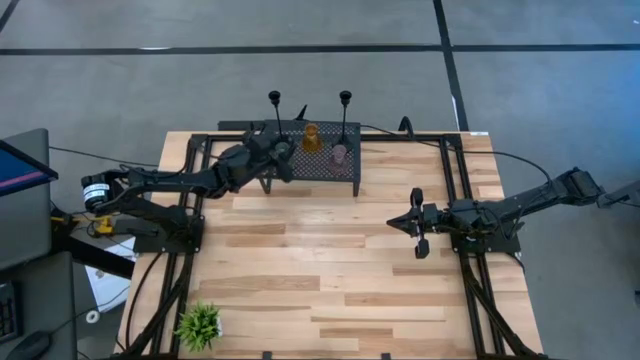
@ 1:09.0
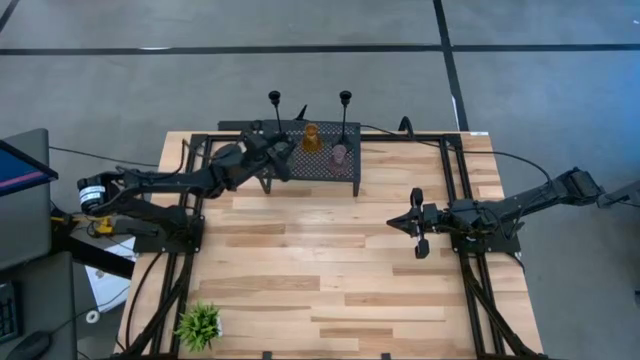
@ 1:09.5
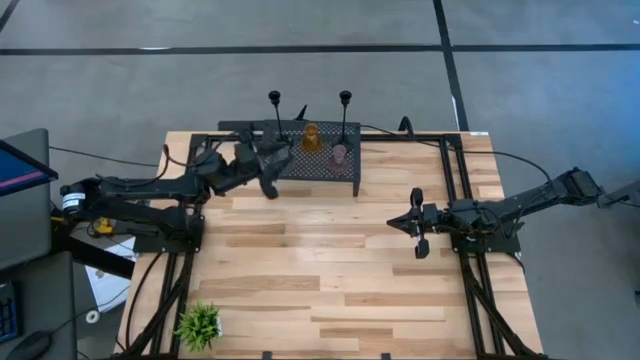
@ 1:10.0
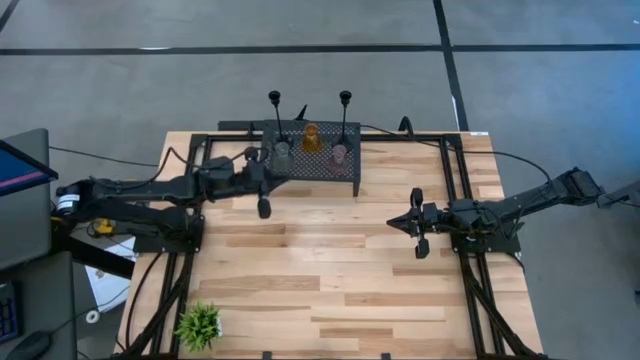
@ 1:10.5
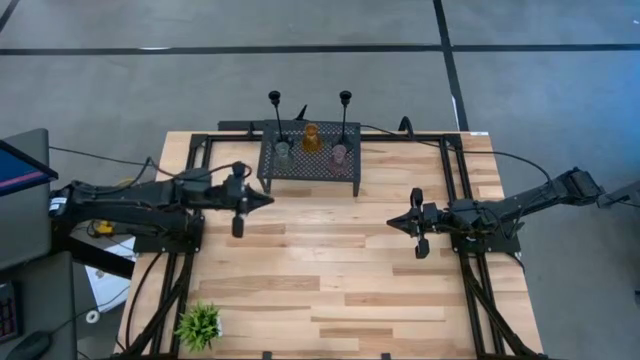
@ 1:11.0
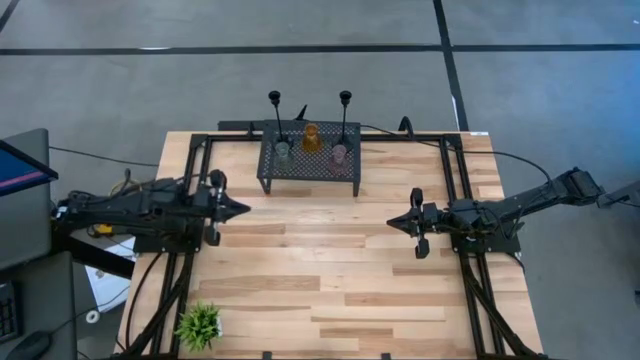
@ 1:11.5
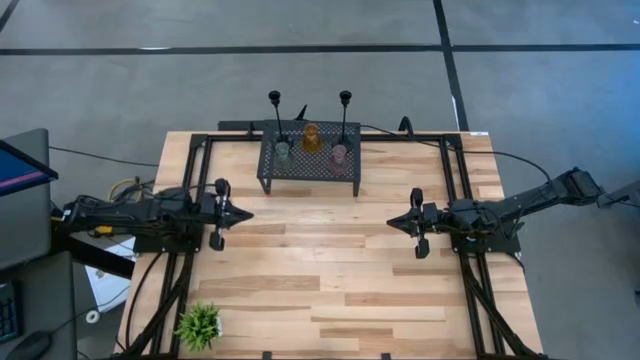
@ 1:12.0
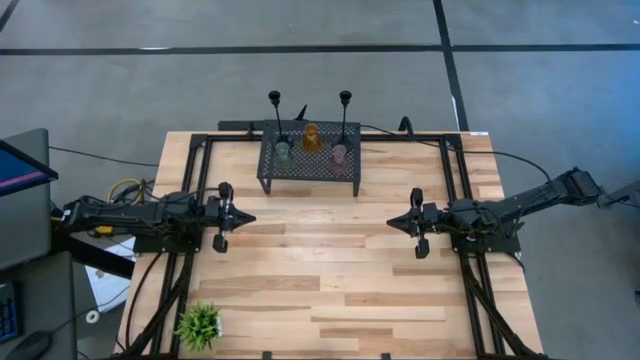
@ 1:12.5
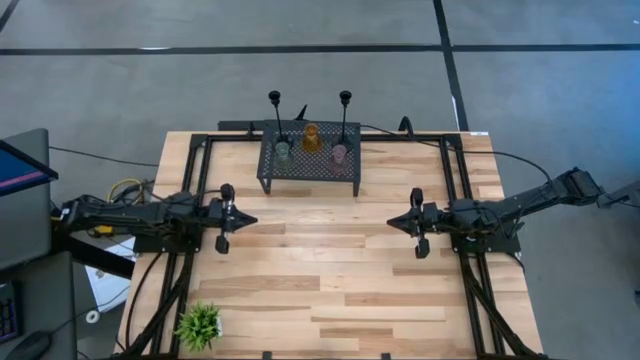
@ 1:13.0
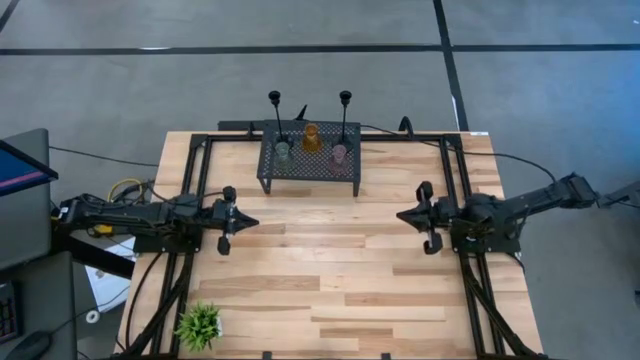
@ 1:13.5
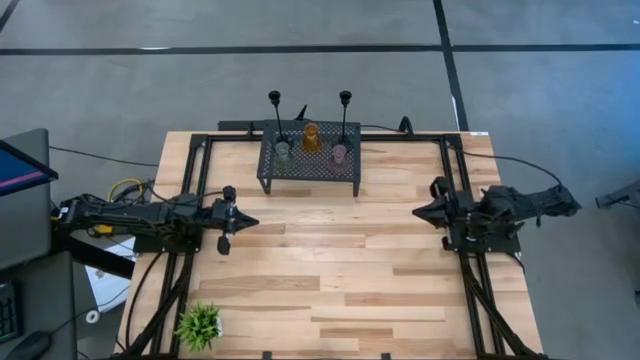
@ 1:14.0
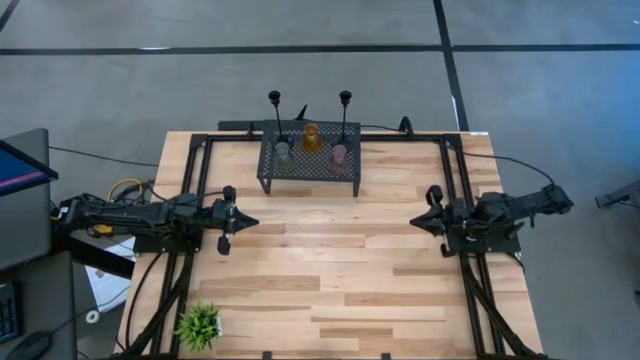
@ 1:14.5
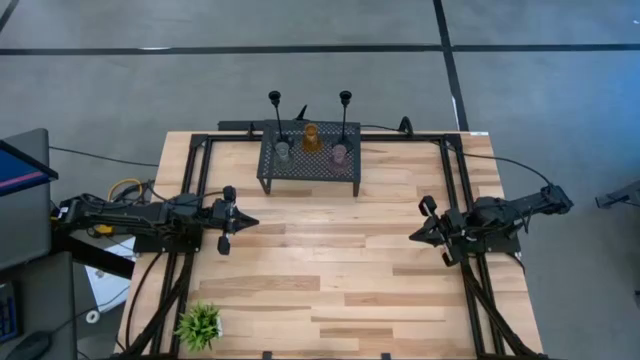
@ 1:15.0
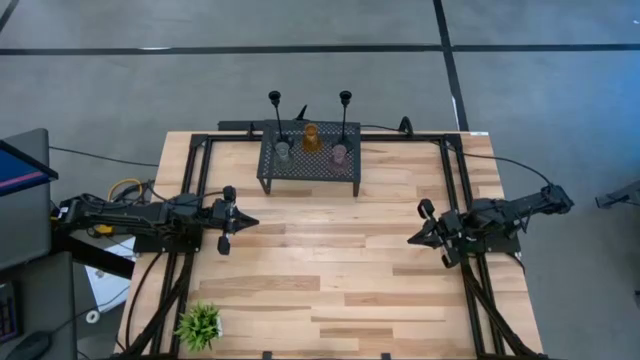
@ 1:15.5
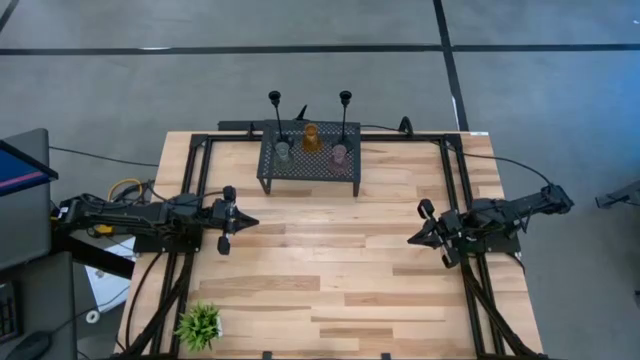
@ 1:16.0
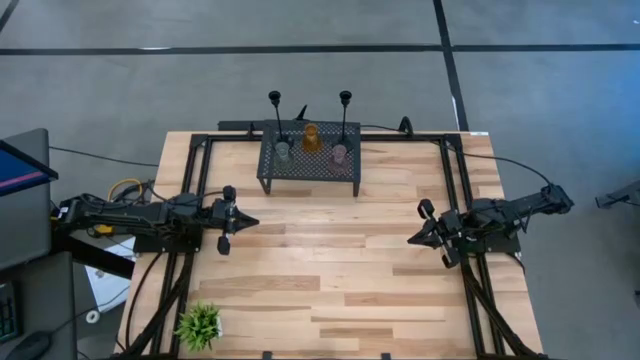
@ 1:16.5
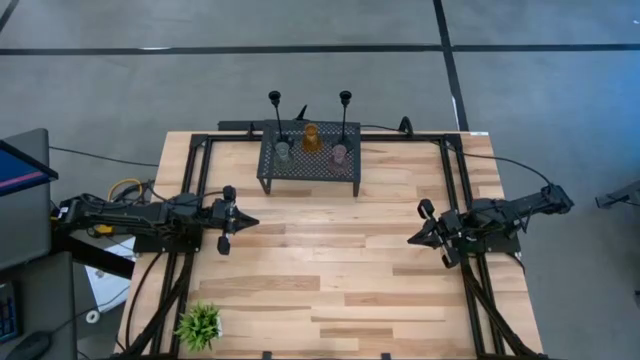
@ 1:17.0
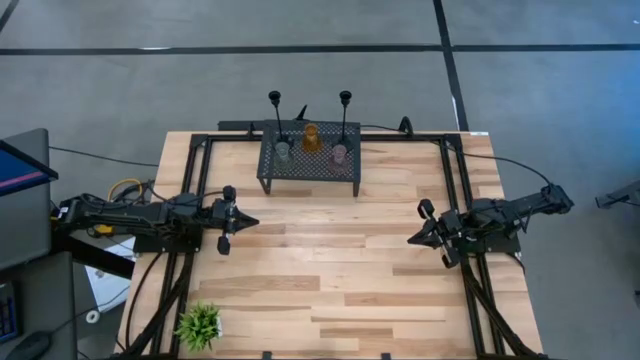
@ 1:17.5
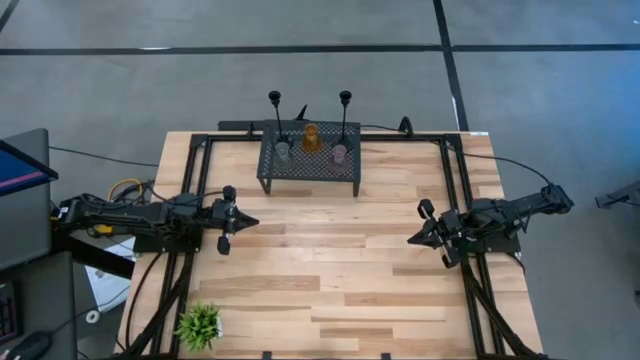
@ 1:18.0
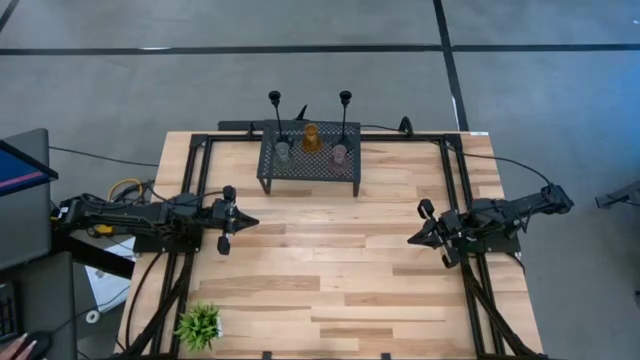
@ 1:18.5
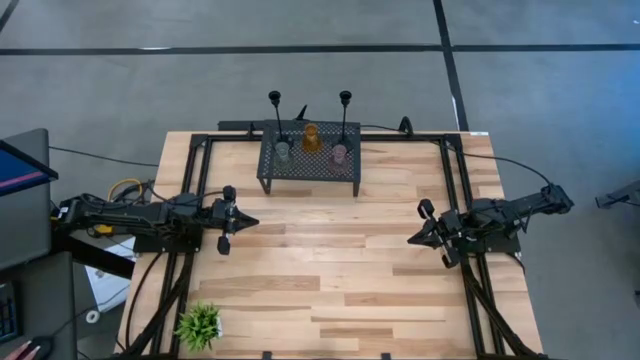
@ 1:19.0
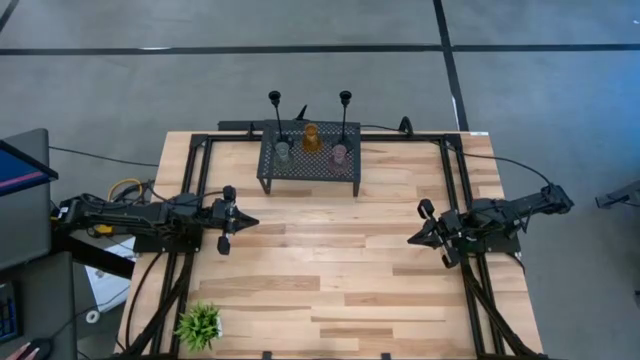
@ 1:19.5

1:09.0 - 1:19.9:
Task: Pick & Place candle stick holders
Return to Home Position

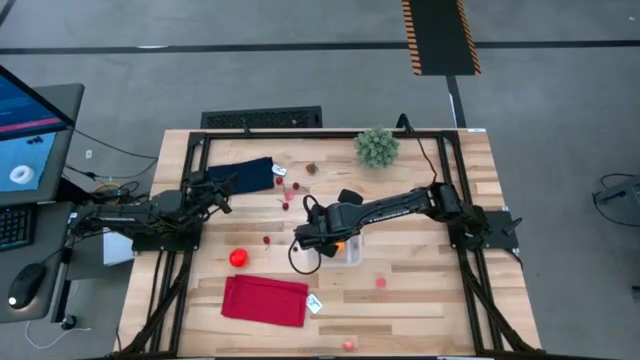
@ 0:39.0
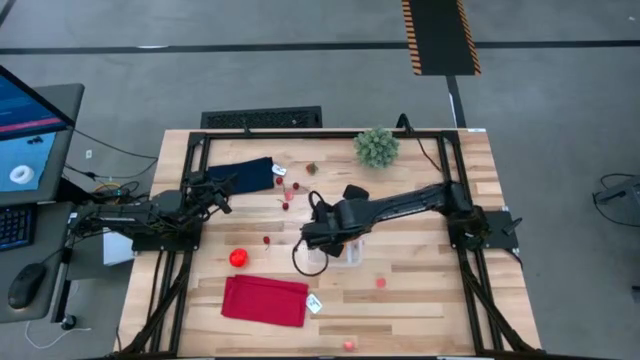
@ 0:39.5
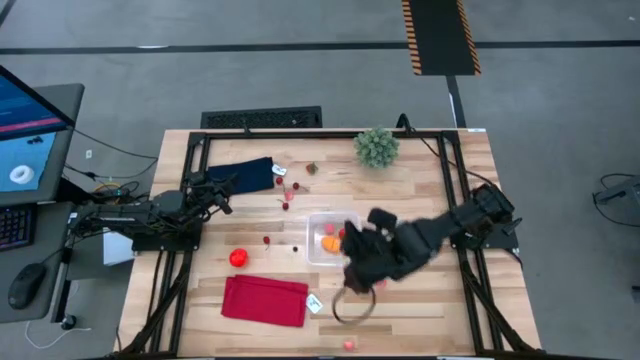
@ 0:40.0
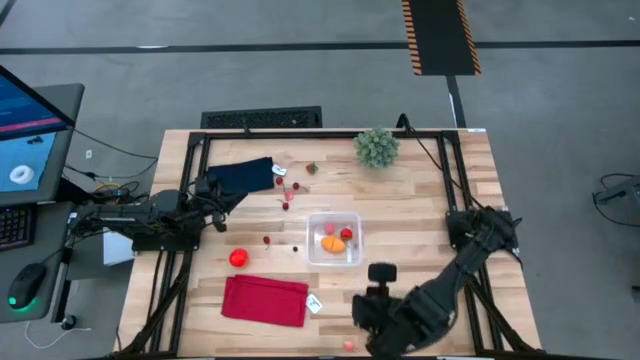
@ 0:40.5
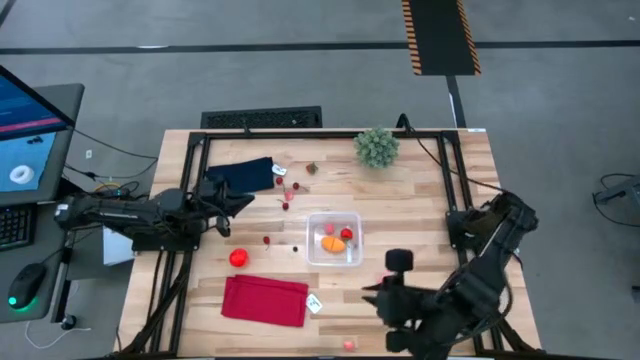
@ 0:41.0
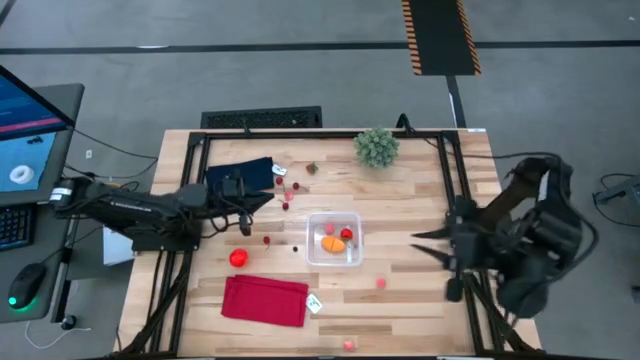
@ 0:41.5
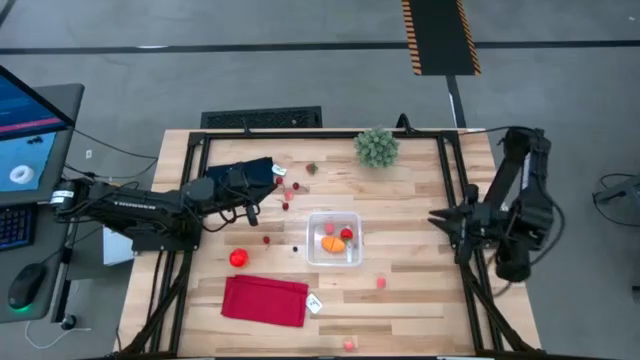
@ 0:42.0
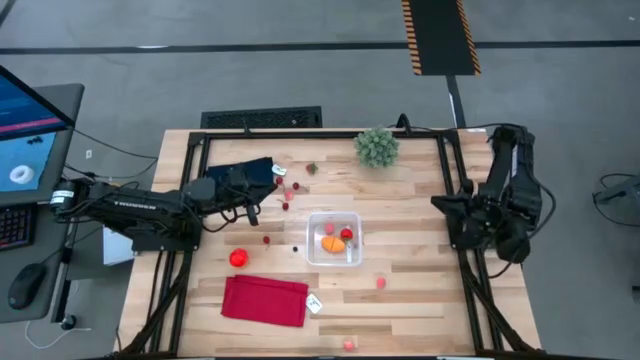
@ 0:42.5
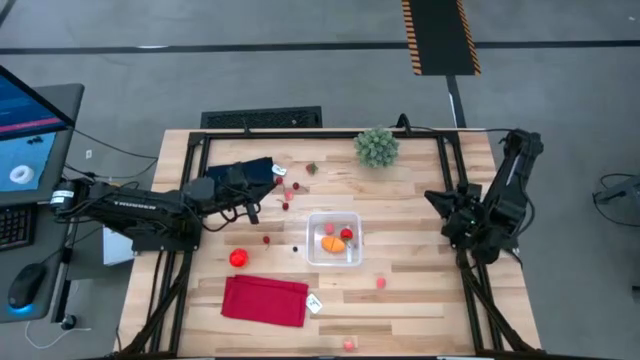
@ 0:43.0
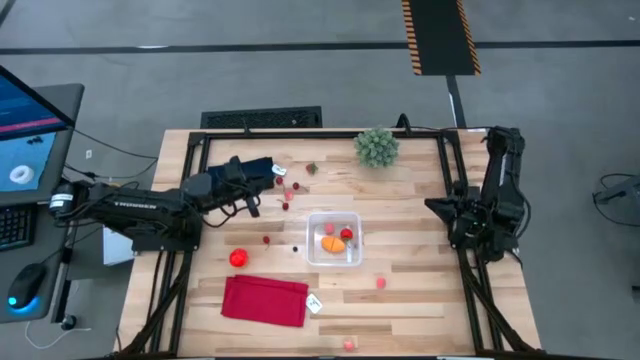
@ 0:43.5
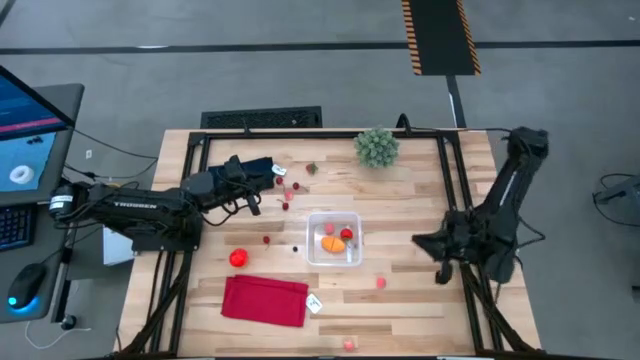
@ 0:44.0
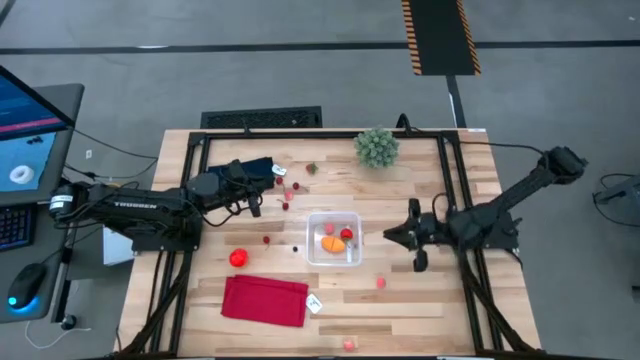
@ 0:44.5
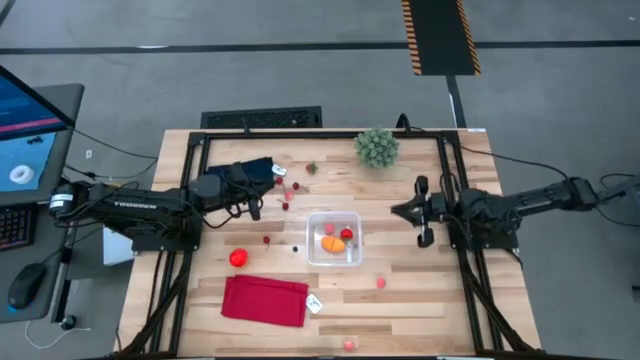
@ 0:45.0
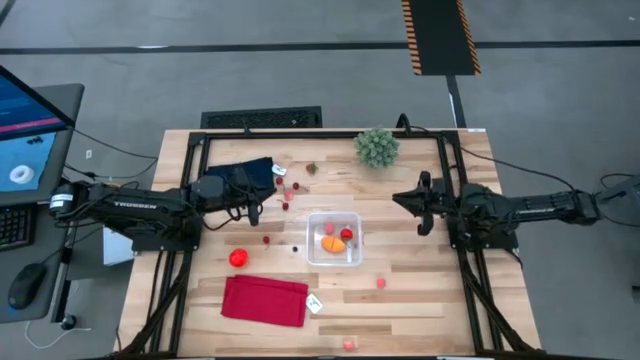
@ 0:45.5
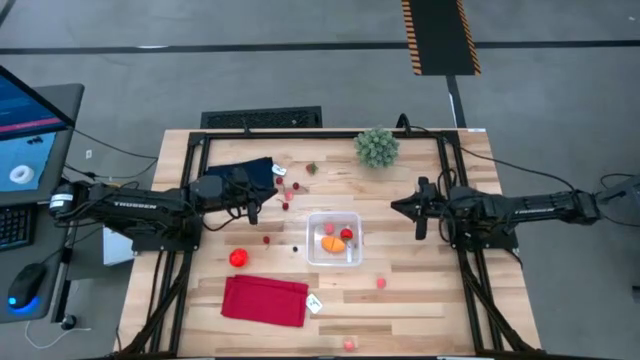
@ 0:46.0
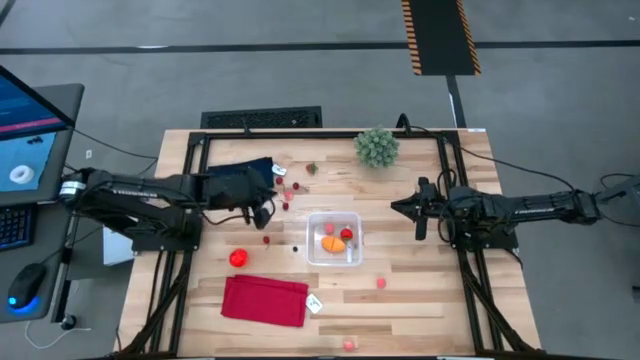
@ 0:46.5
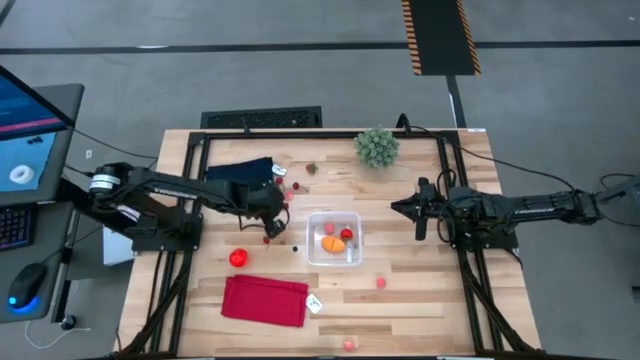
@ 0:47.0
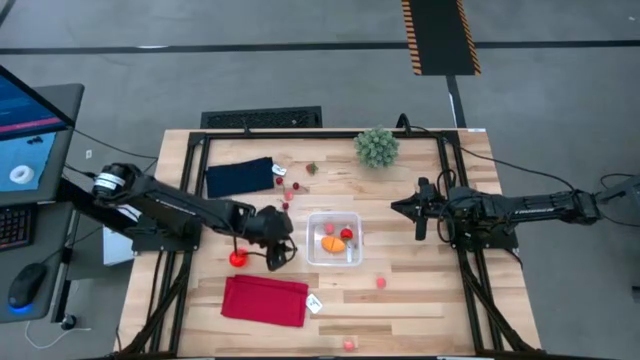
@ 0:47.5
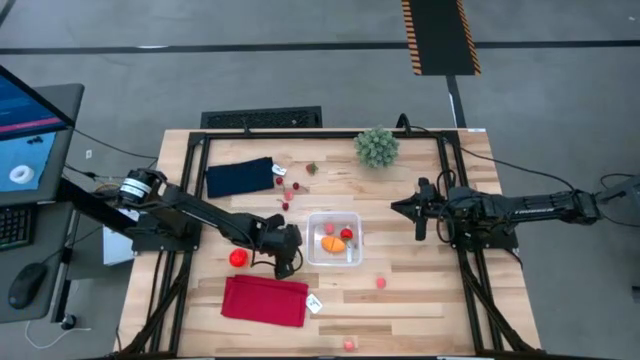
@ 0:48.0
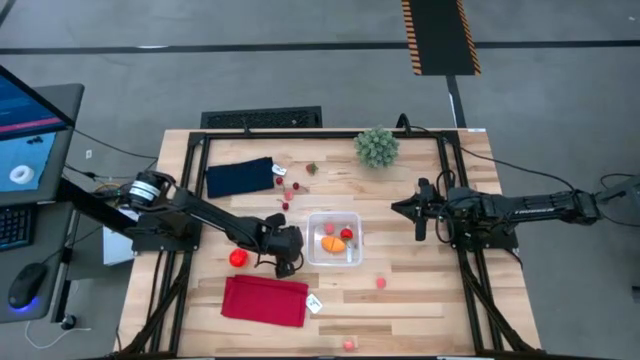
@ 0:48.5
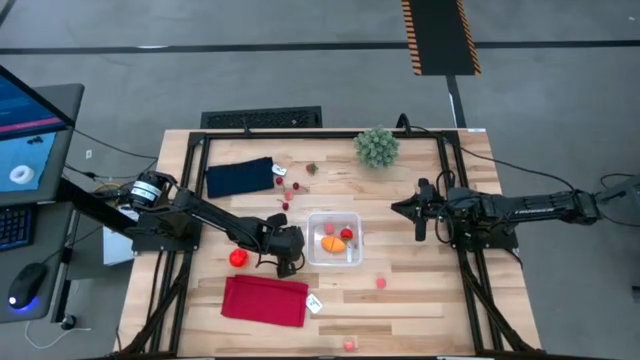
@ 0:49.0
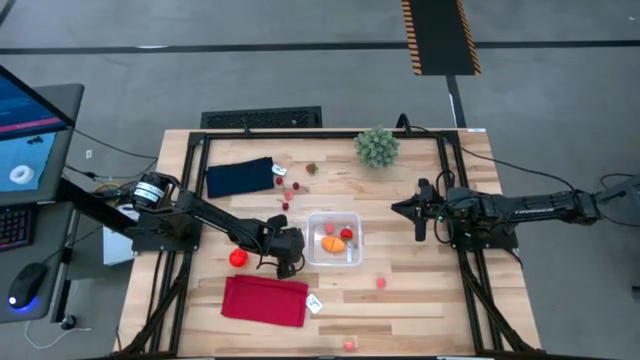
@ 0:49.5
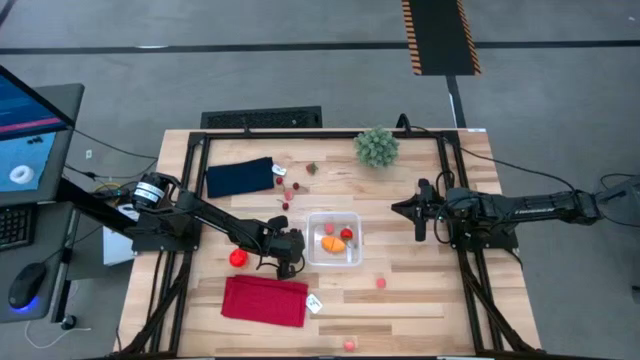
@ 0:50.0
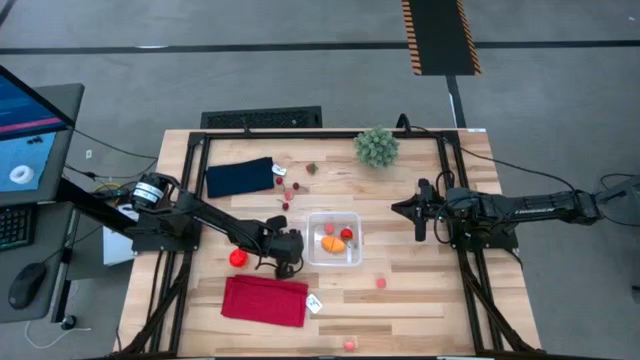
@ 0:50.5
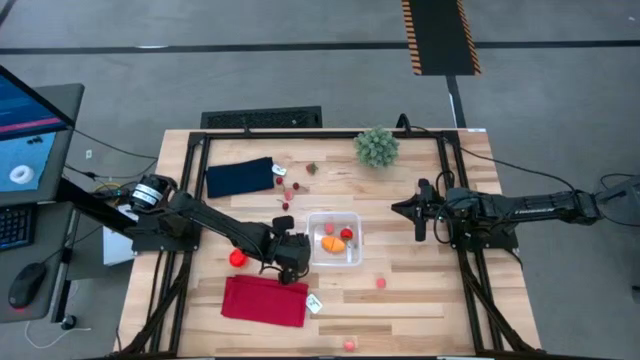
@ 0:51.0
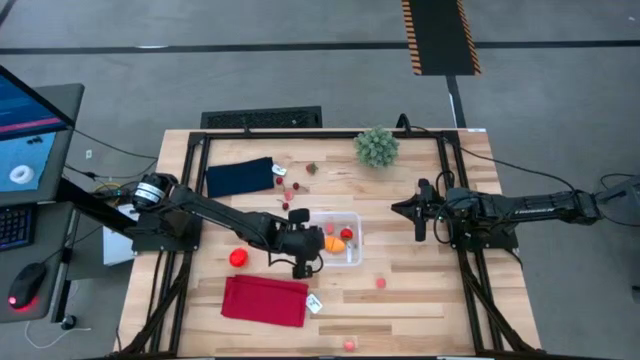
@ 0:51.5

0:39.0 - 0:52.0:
Task: Pick and placing Produce into tupperware
Put the blueberry into the transparent bin
